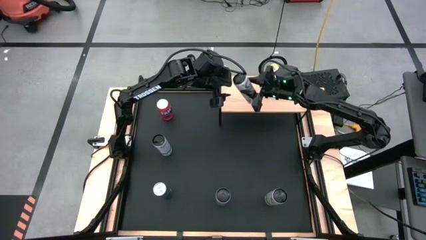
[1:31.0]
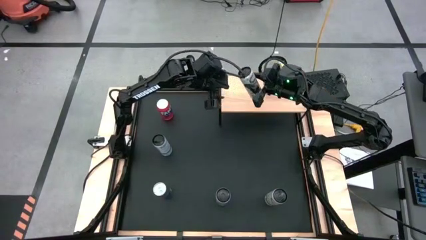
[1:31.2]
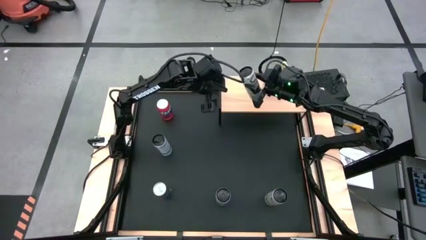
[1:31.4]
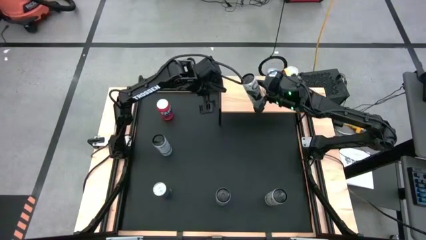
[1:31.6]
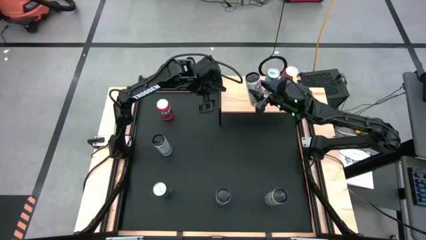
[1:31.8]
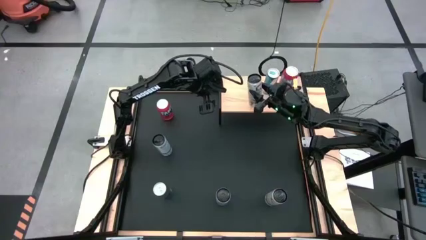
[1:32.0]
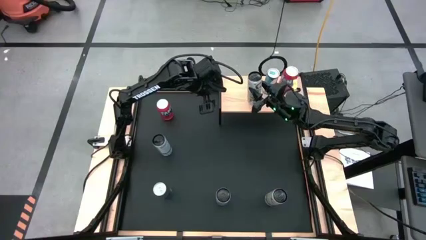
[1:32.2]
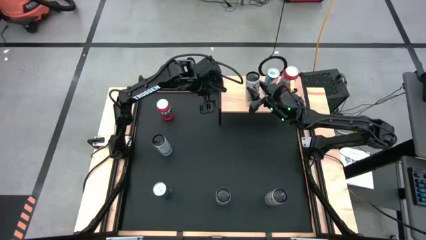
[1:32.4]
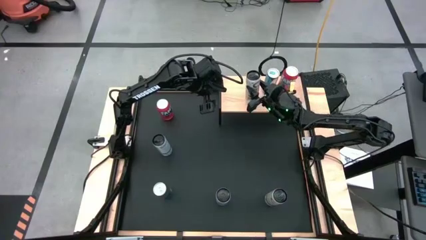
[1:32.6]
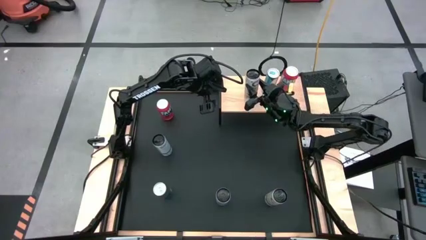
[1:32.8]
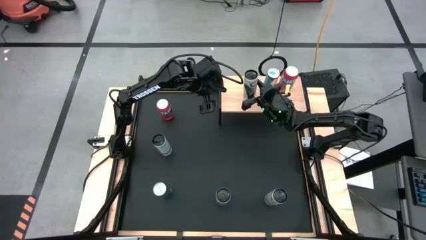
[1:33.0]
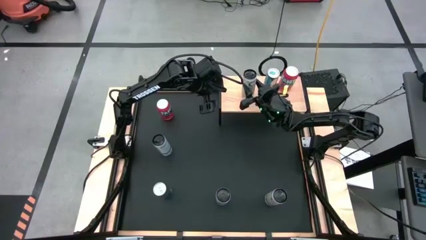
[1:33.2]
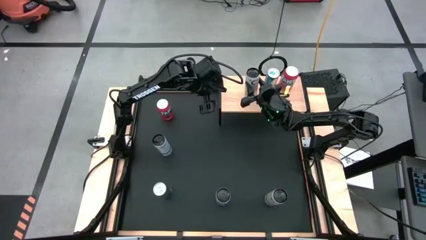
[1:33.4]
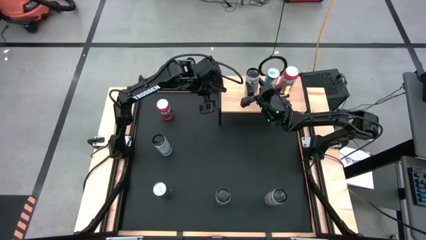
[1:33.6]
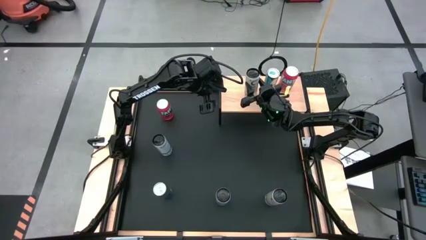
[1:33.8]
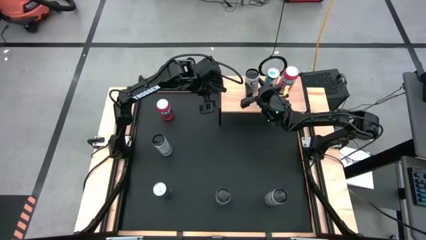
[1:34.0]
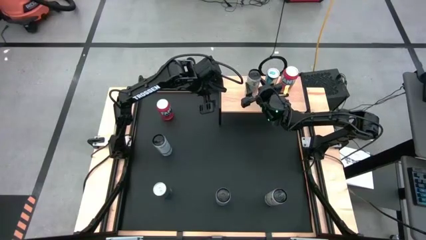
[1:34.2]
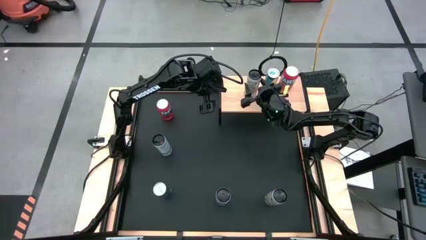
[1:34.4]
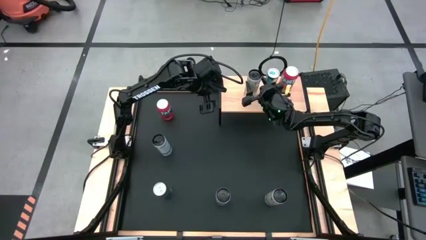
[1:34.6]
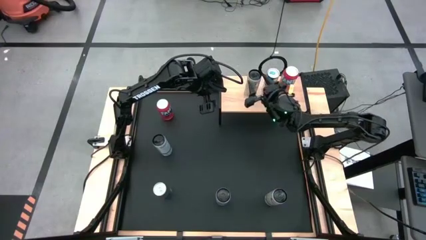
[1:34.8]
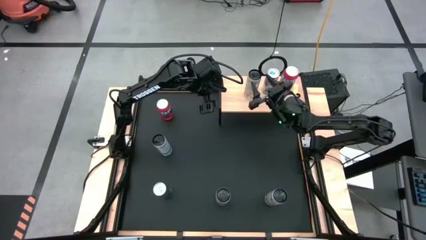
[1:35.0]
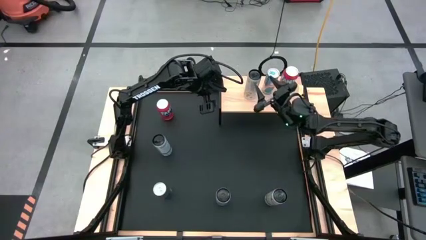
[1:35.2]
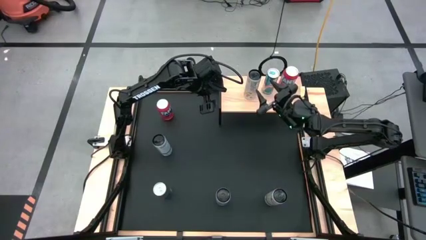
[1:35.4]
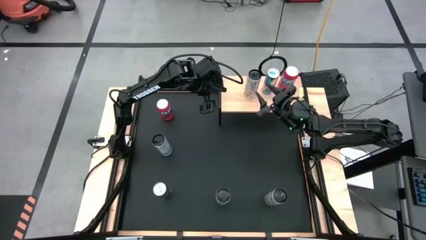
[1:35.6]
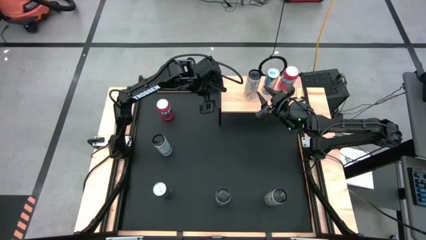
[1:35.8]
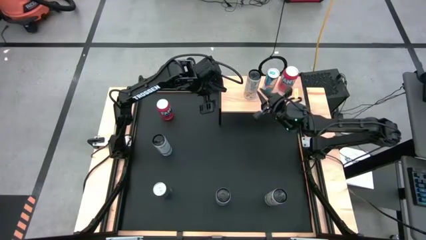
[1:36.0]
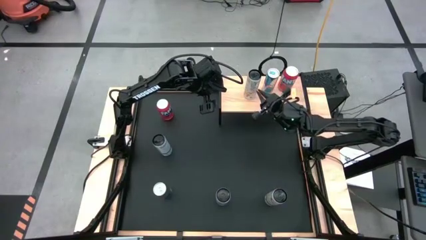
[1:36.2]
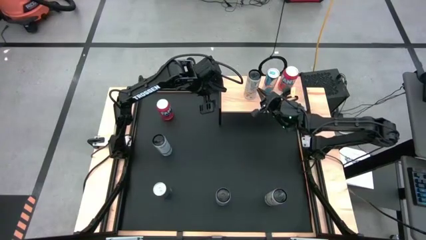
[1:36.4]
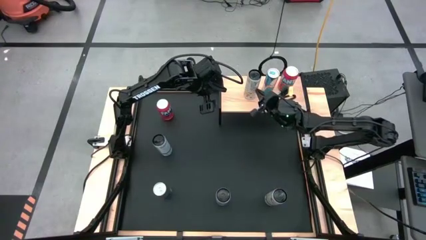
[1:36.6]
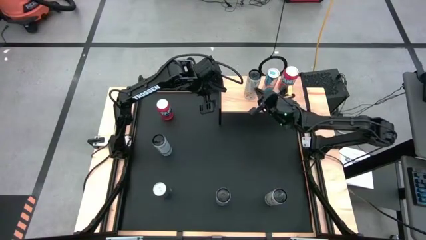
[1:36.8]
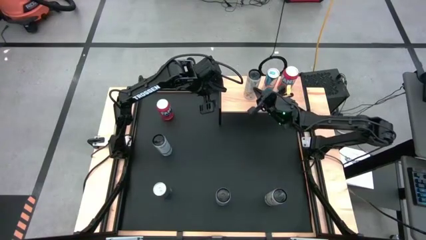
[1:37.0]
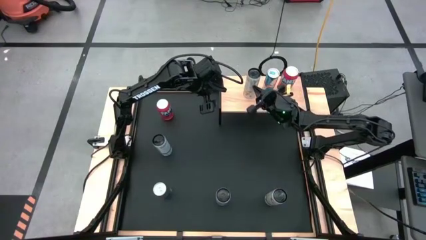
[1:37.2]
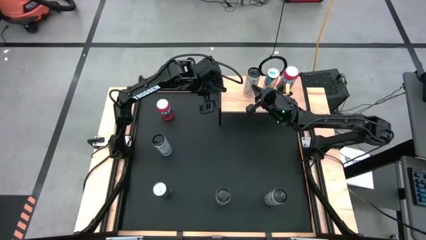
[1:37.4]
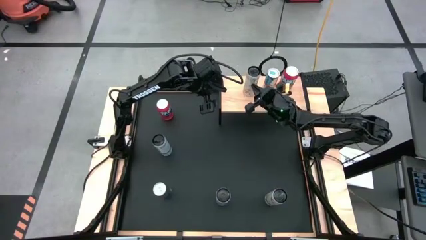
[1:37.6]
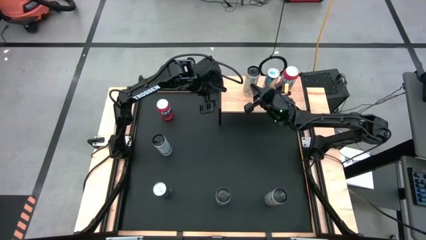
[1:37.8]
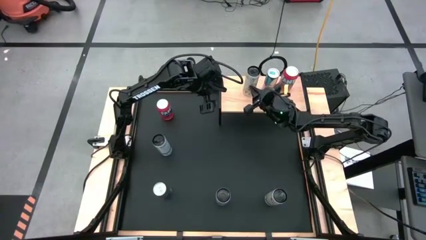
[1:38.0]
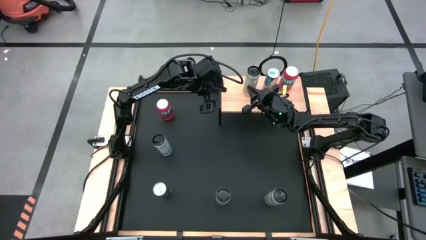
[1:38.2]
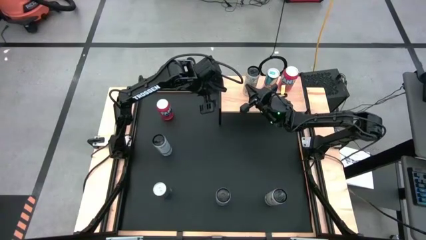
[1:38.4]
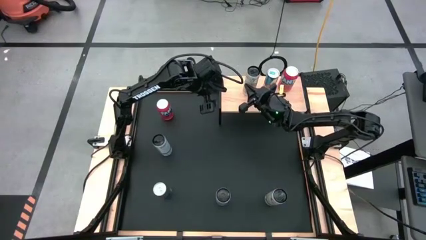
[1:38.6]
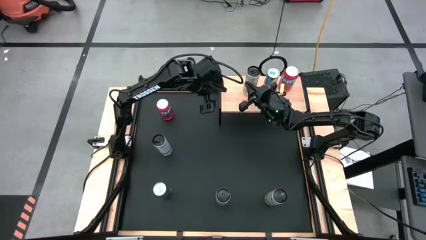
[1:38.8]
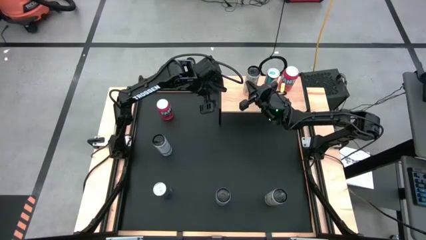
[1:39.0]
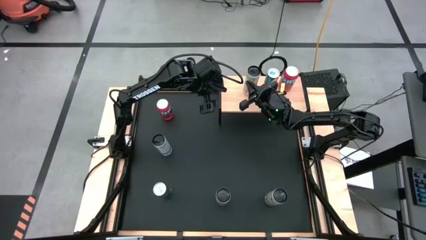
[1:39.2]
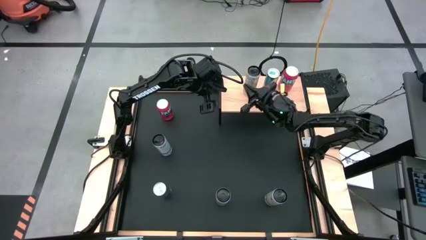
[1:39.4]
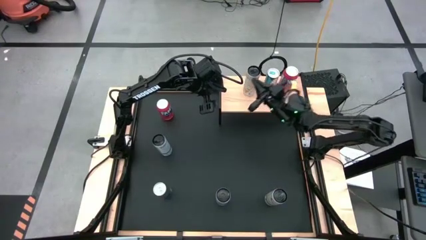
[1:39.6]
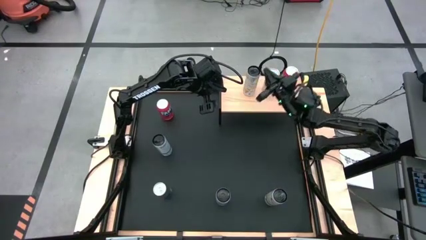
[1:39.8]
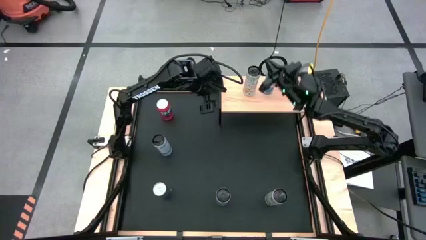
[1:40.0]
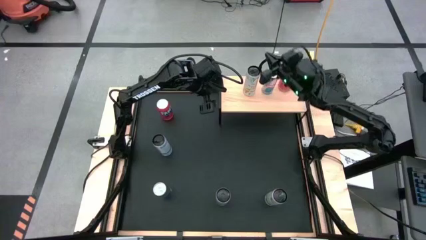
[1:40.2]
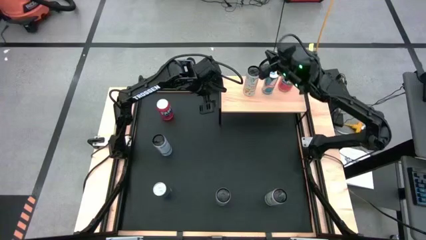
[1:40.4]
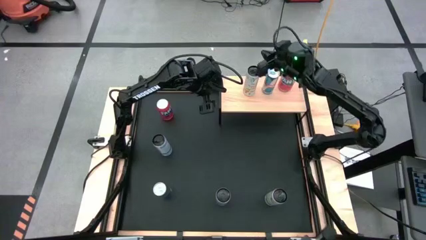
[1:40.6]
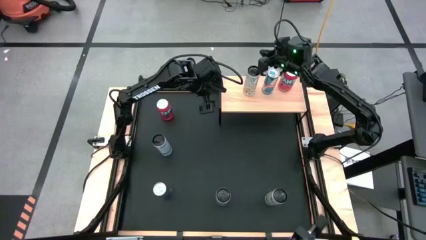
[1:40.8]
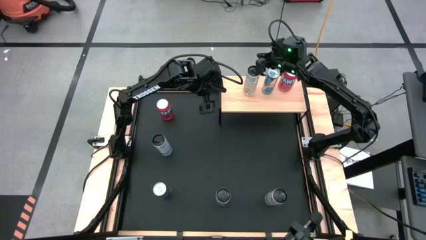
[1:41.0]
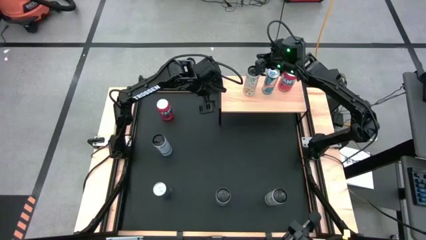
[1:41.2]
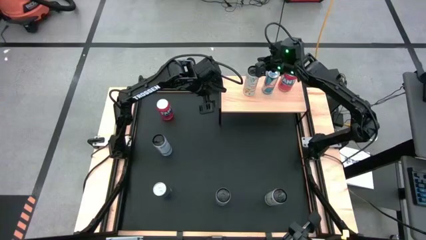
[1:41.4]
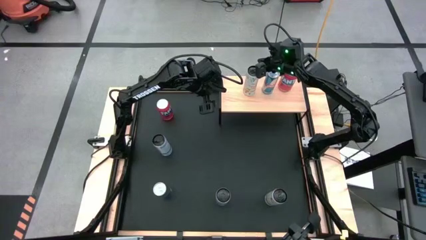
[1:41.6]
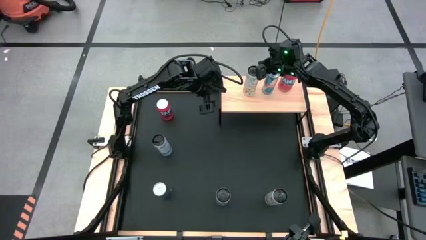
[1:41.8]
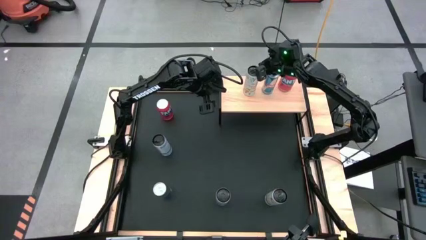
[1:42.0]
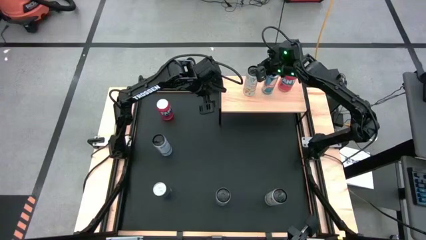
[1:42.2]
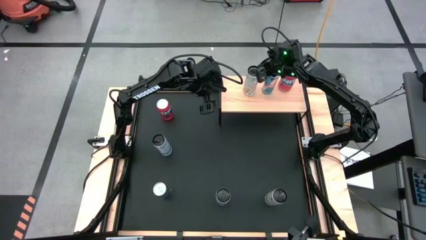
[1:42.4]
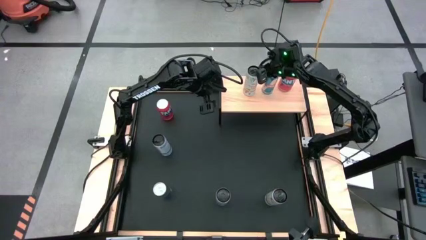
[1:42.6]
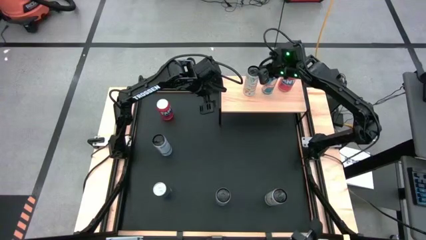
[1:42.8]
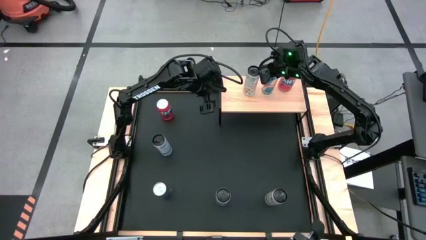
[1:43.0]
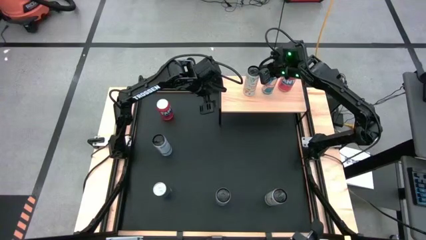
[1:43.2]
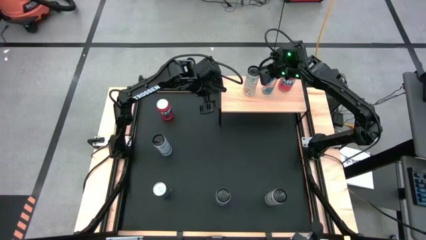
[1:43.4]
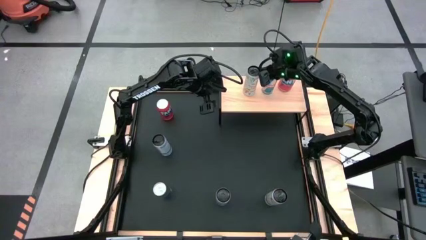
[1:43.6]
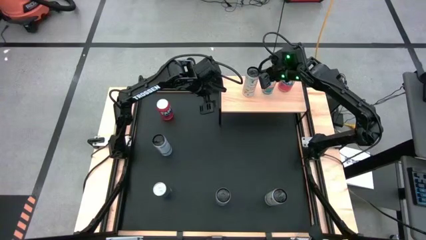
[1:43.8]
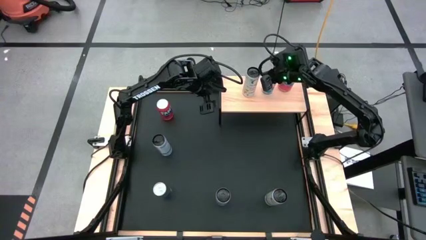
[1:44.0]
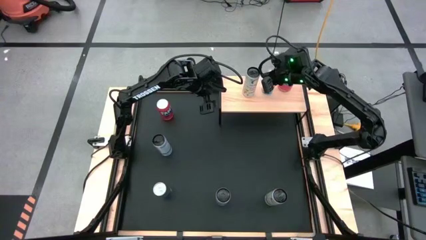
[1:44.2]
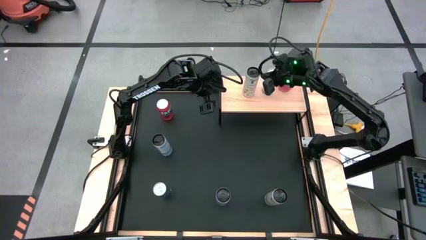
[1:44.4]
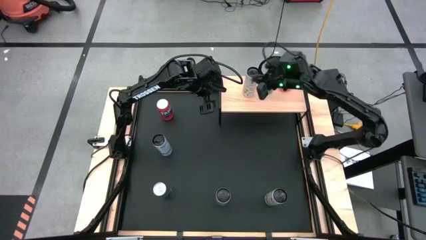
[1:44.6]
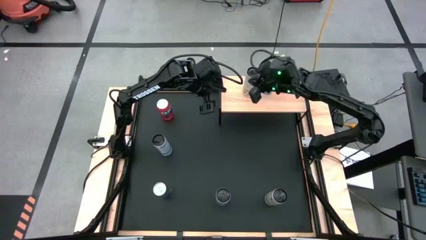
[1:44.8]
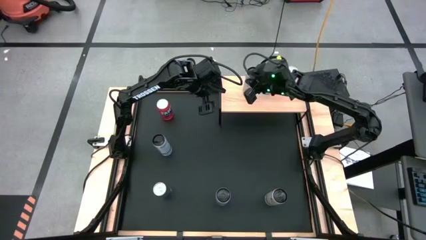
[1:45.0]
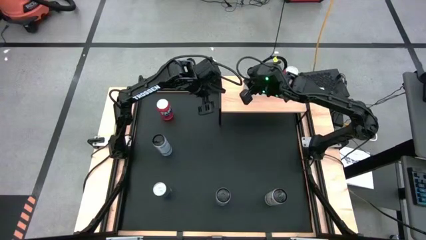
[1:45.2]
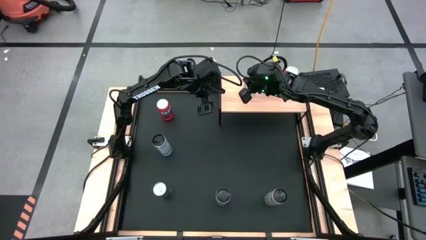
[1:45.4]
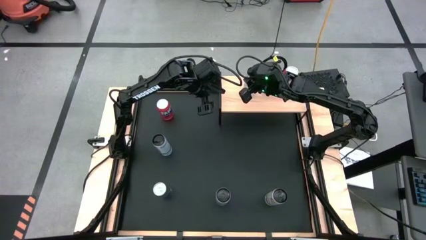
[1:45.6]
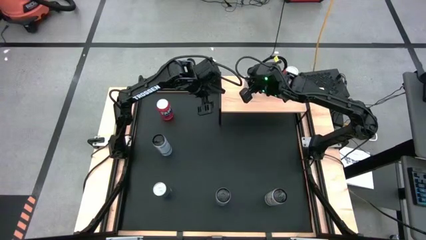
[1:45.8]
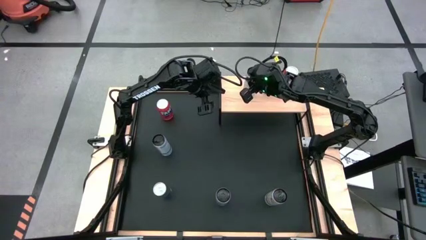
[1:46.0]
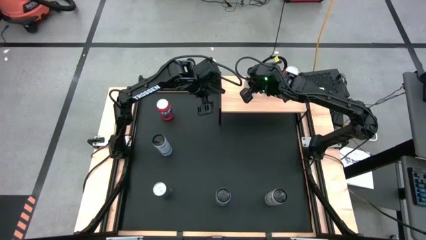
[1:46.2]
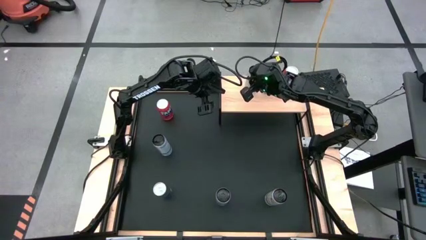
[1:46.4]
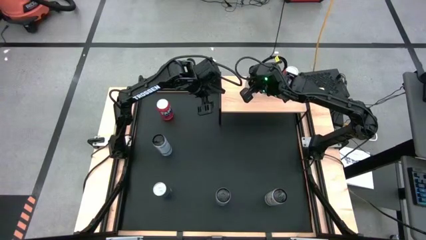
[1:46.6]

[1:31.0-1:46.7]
Task: Place canned beverage on shelf
Put the top white yellow soda can on the shelf
